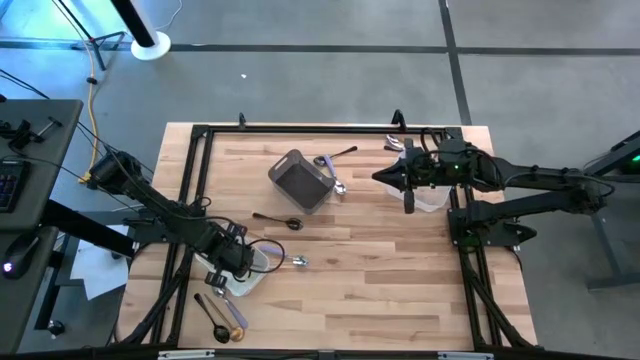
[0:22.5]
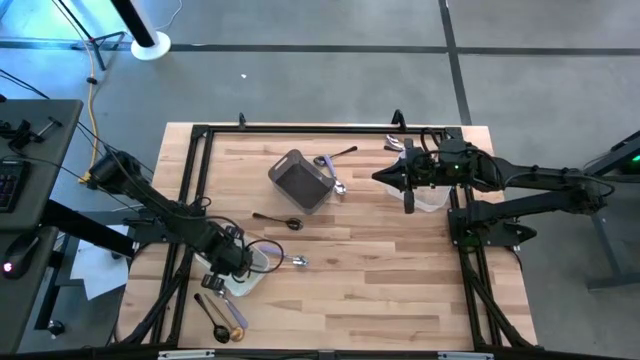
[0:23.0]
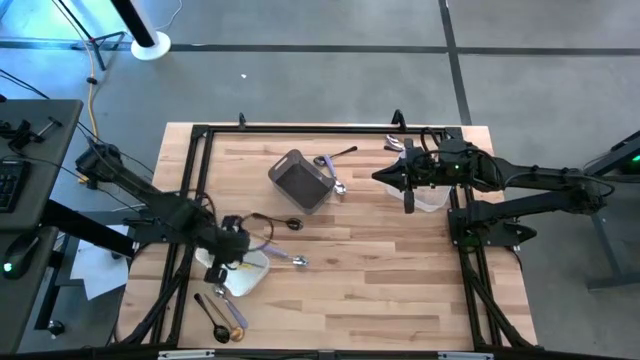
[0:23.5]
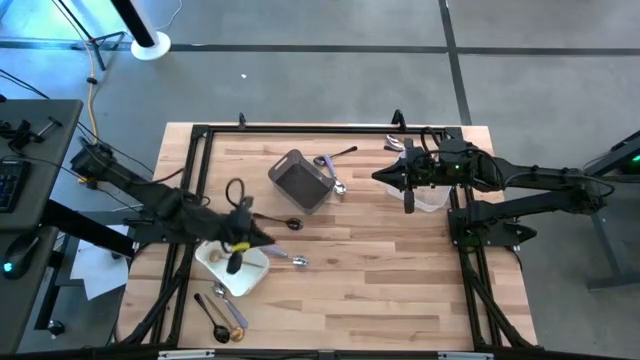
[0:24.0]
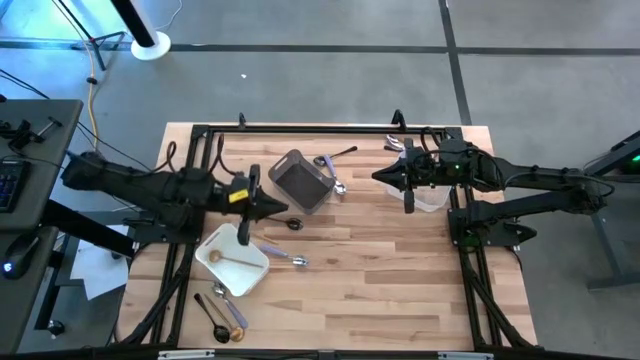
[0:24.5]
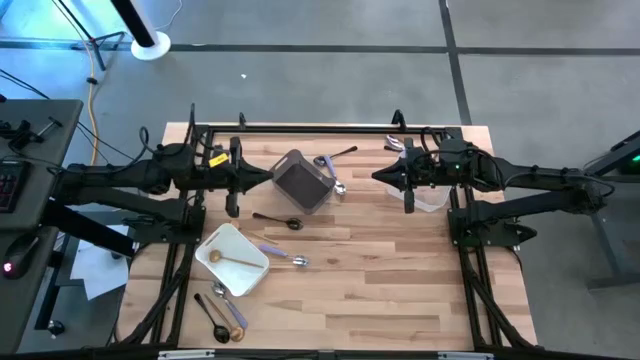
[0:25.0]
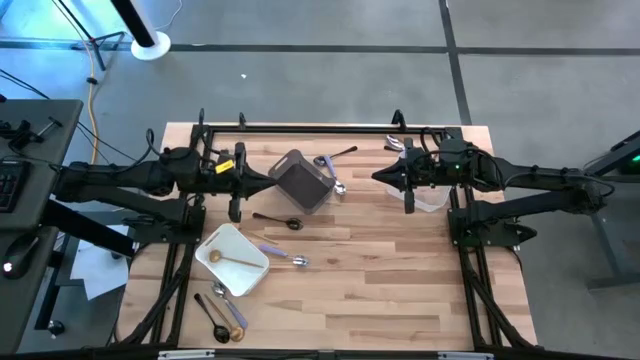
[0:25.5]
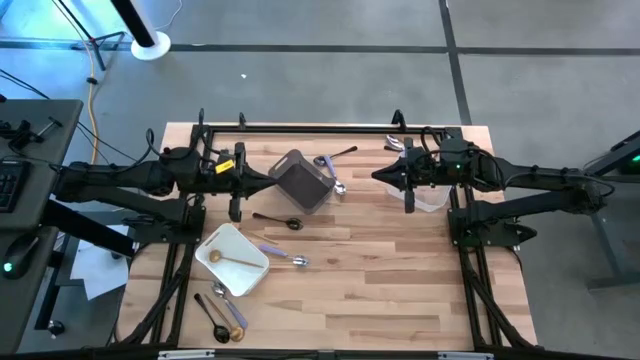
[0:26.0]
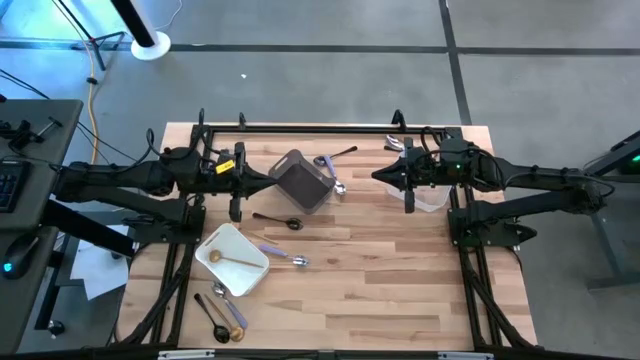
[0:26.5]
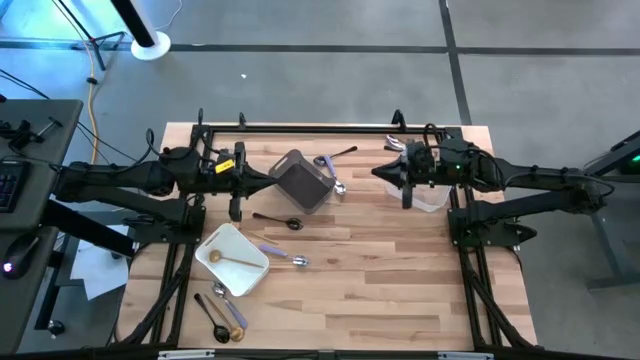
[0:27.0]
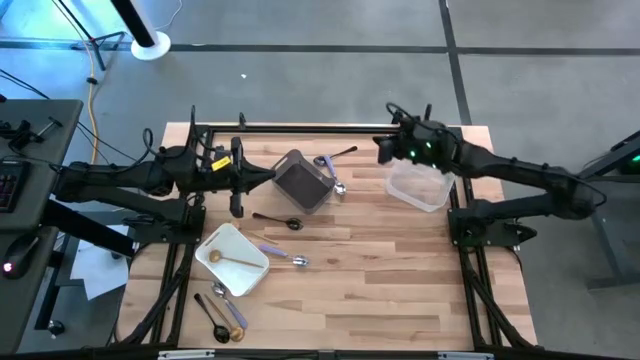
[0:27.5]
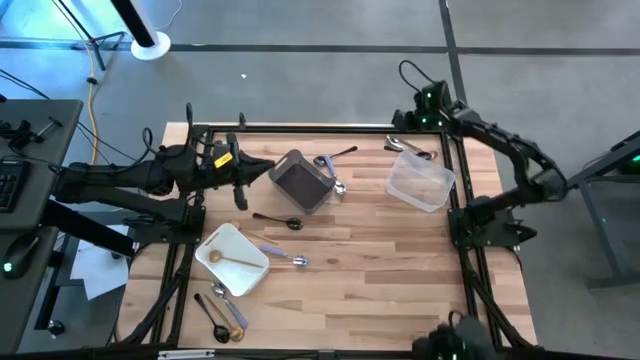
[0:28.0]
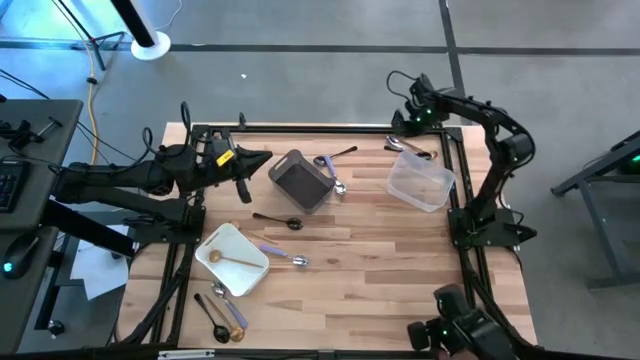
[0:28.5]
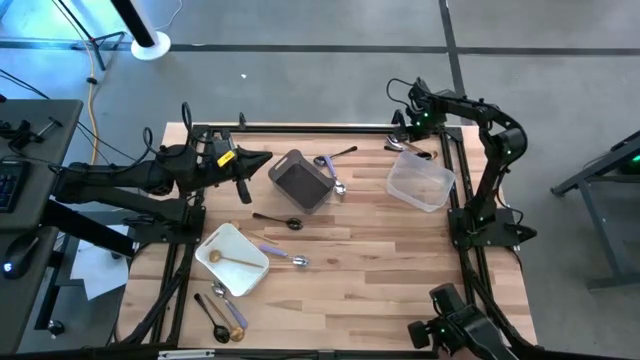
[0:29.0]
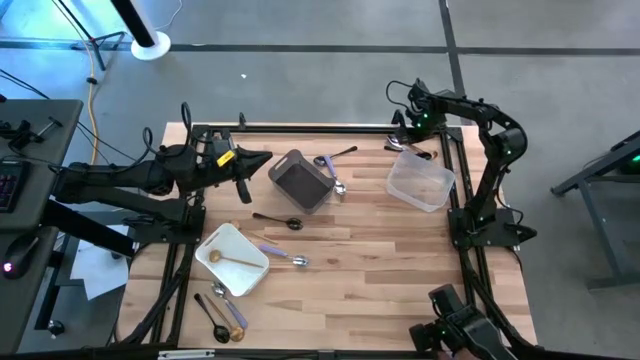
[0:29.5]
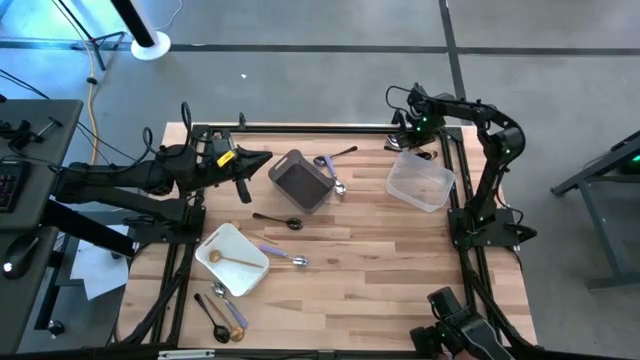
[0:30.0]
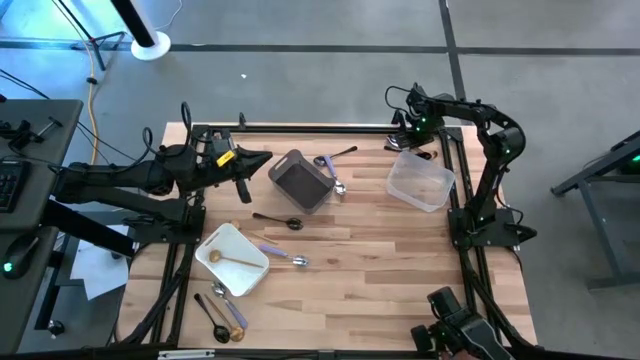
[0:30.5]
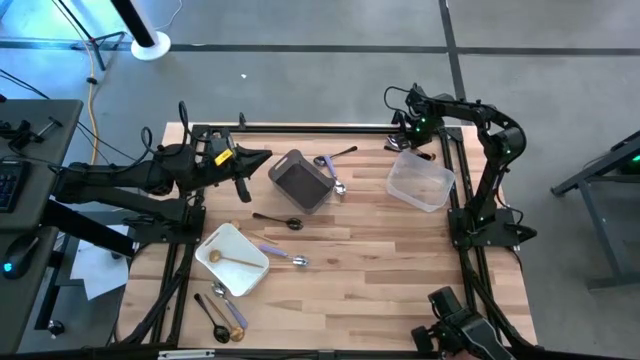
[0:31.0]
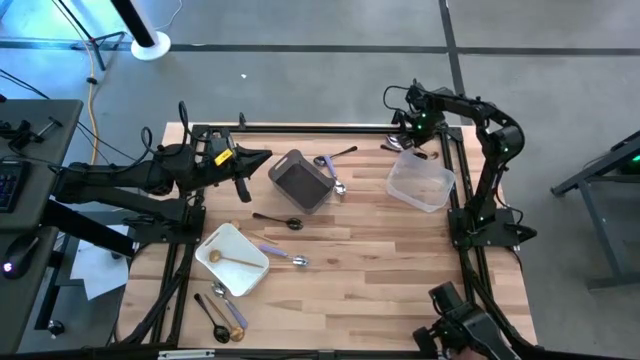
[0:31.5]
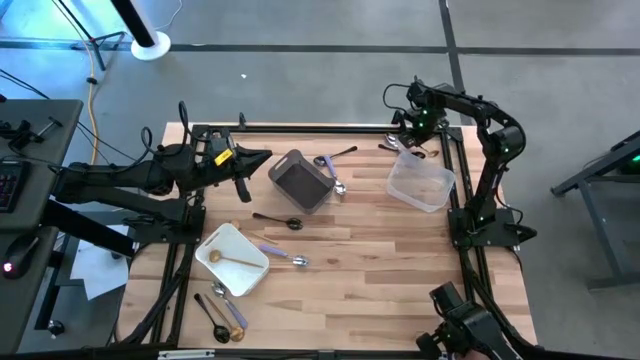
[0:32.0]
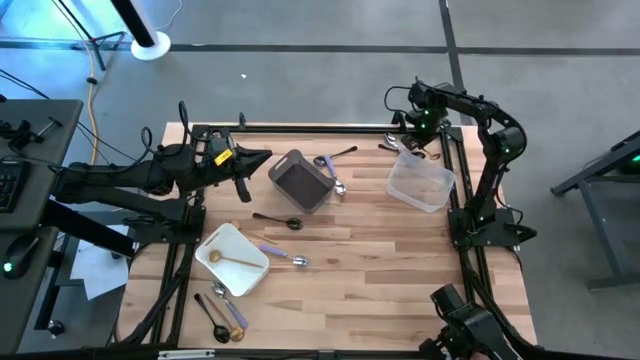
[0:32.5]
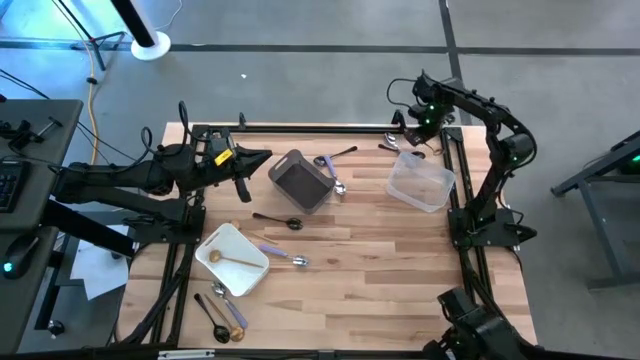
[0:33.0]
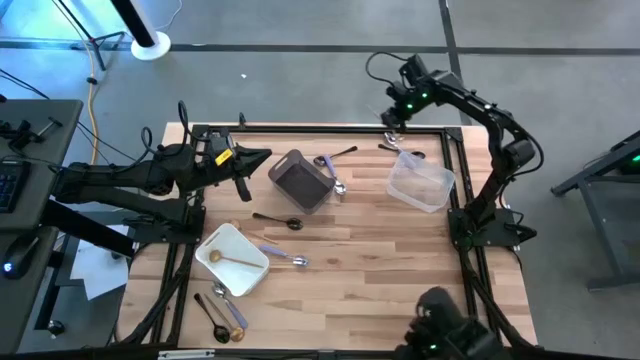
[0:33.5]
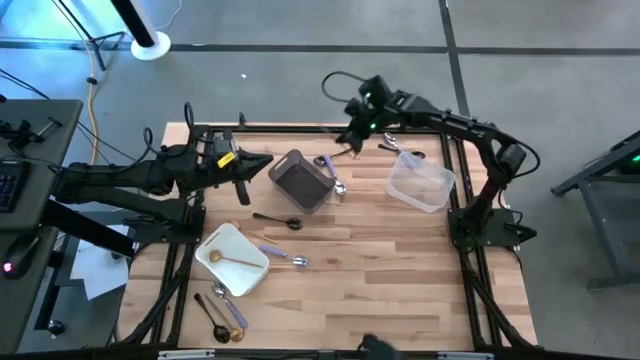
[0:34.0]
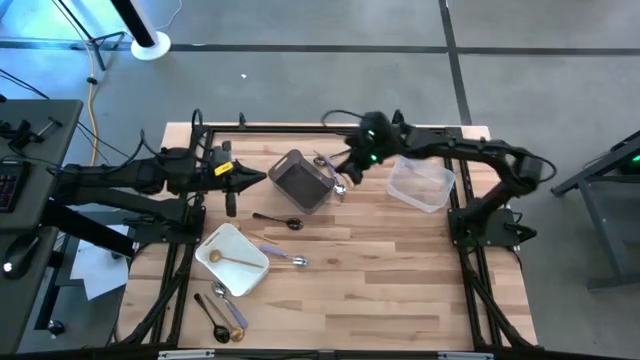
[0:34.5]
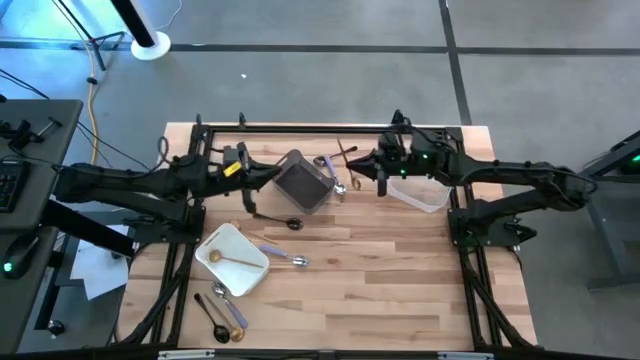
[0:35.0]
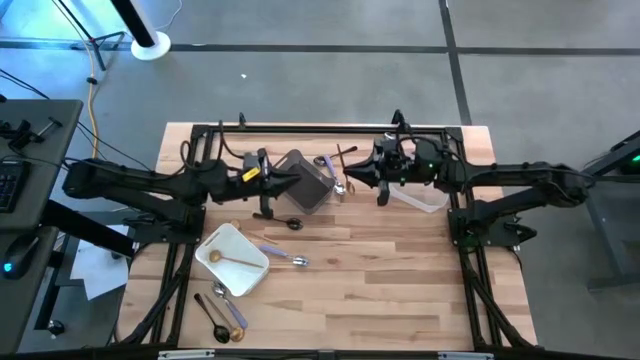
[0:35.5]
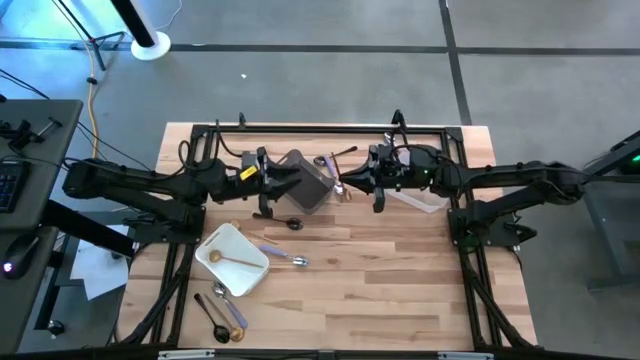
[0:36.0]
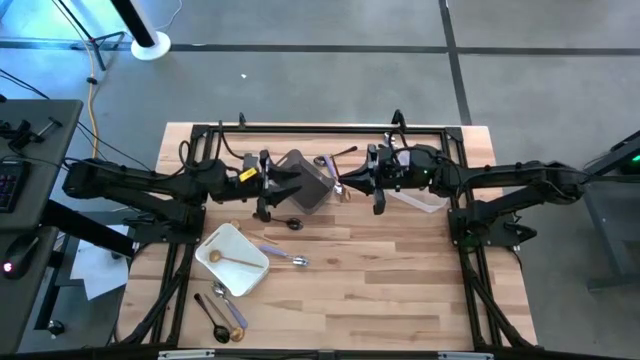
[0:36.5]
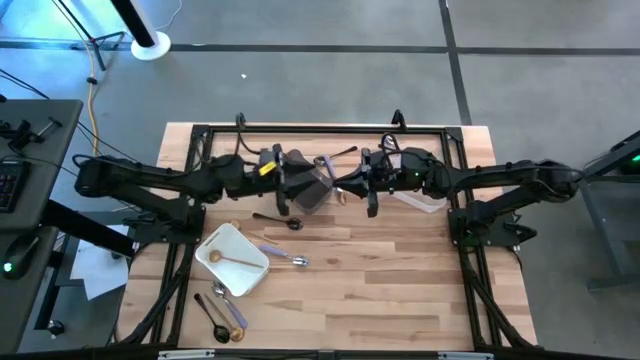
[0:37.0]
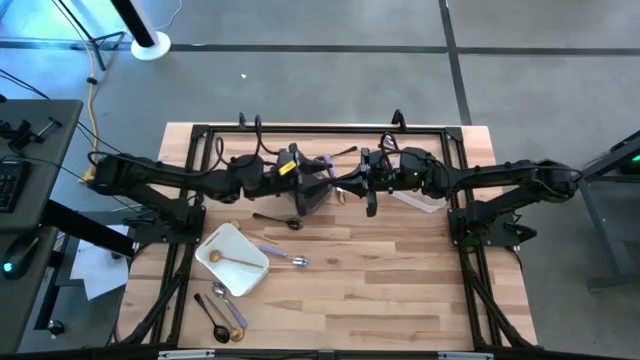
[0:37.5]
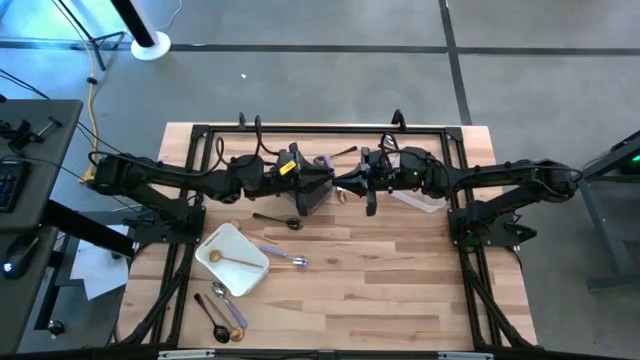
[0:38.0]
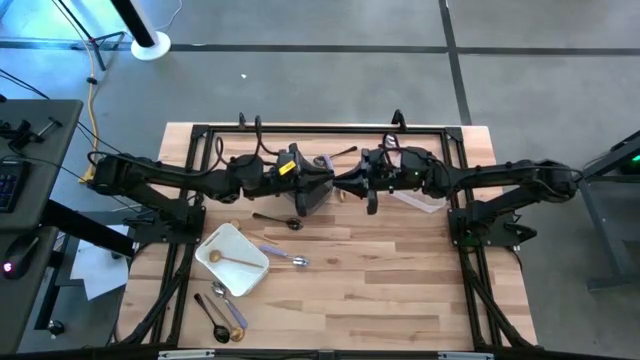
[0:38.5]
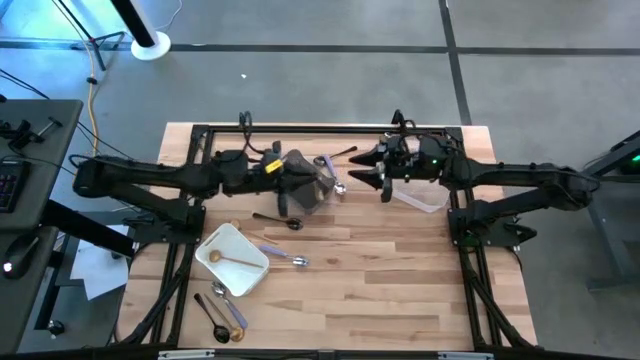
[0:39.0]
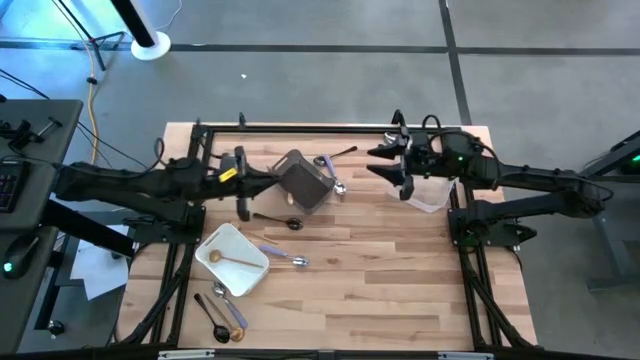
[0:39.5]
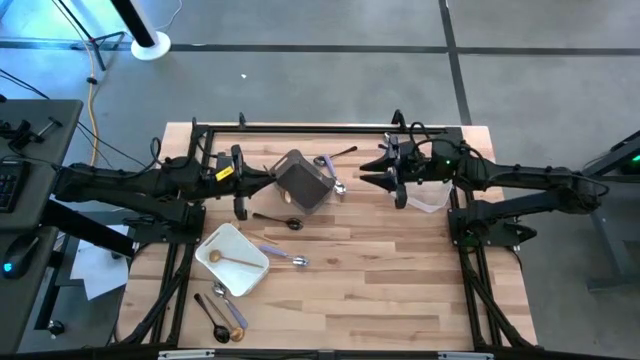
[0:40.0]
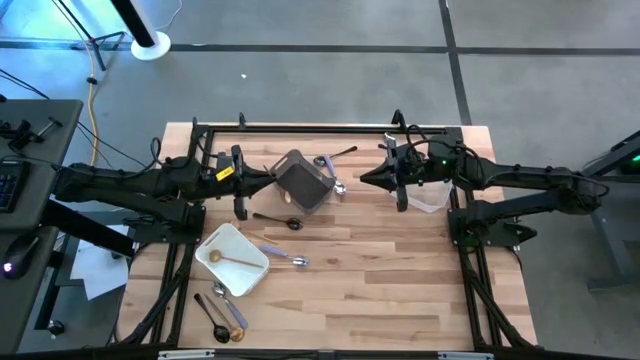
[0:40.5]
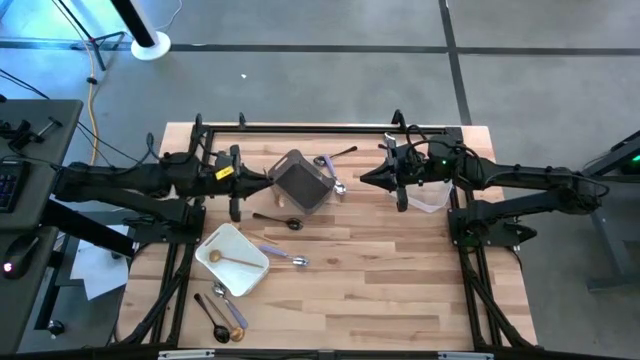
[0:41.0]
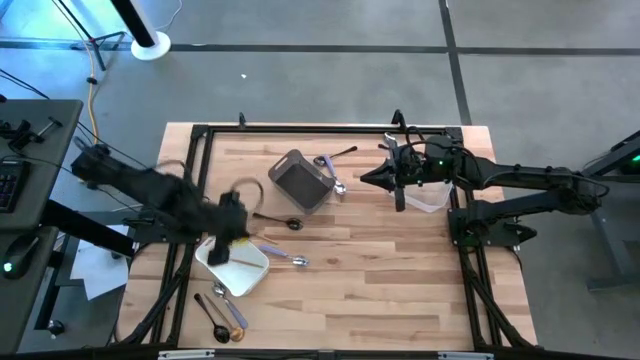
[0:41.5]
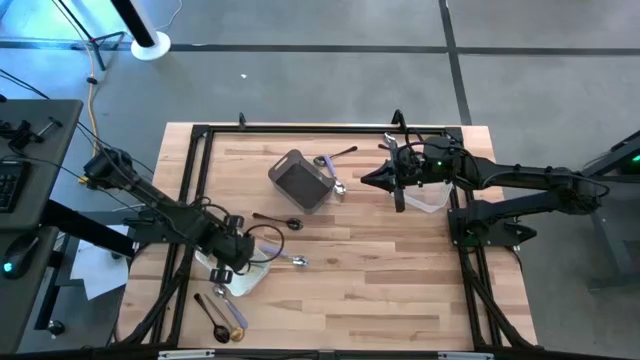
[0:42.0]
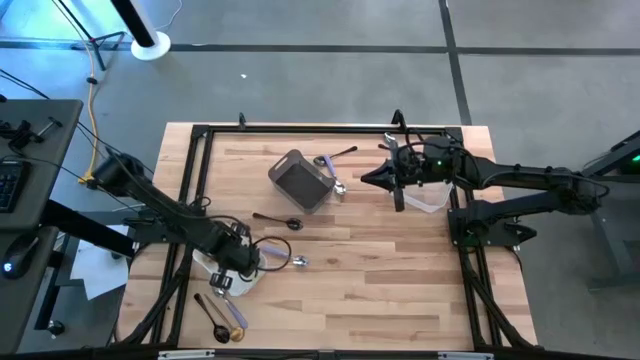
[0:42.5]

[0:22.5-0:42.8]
Task: Sort silverware by color (type)
Put the top right gold spoon into the white bin
